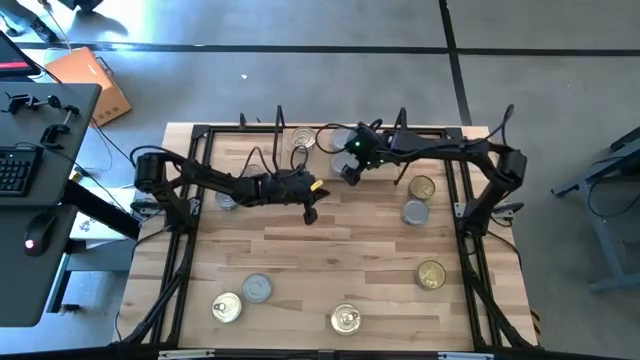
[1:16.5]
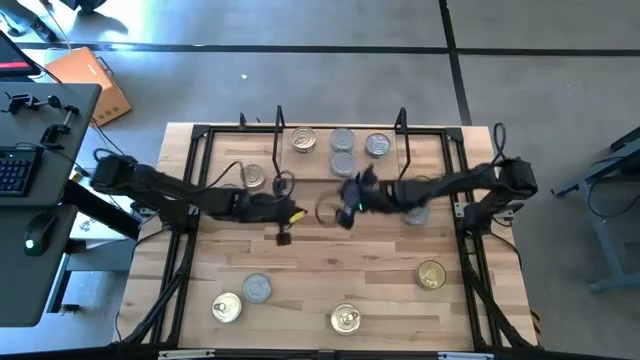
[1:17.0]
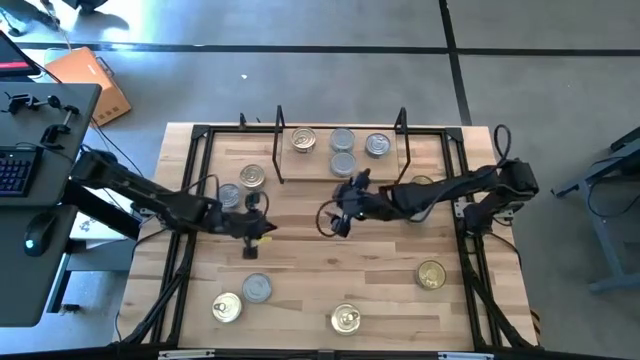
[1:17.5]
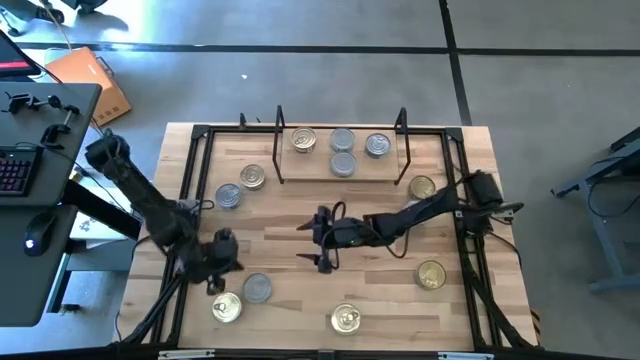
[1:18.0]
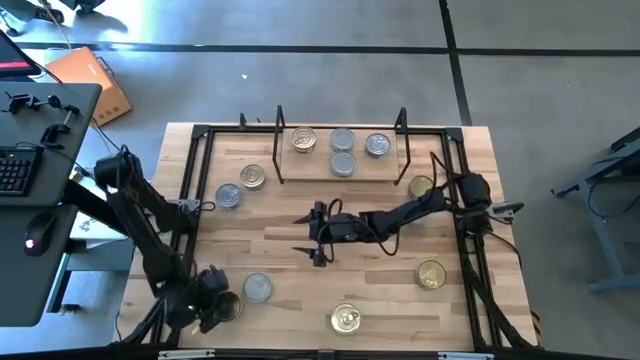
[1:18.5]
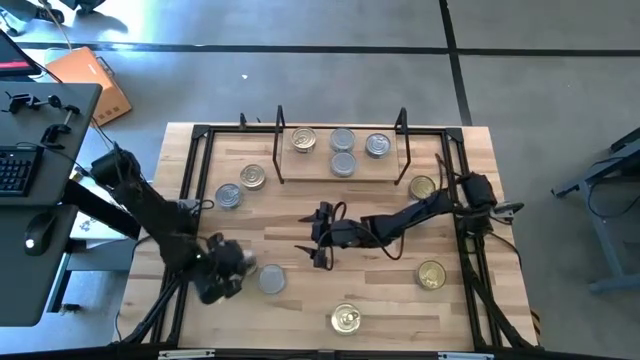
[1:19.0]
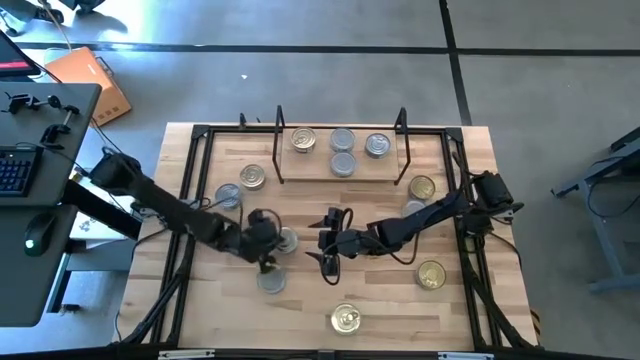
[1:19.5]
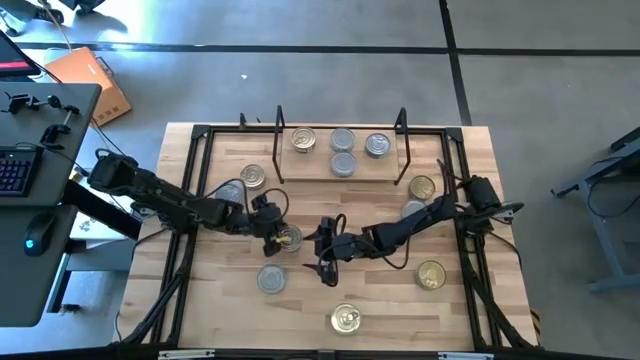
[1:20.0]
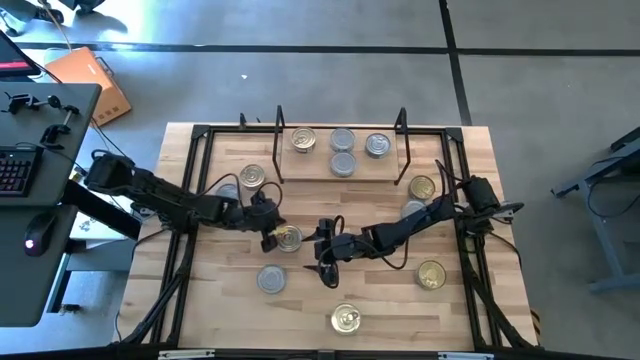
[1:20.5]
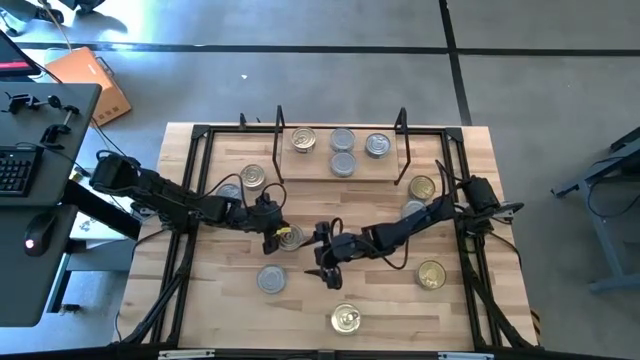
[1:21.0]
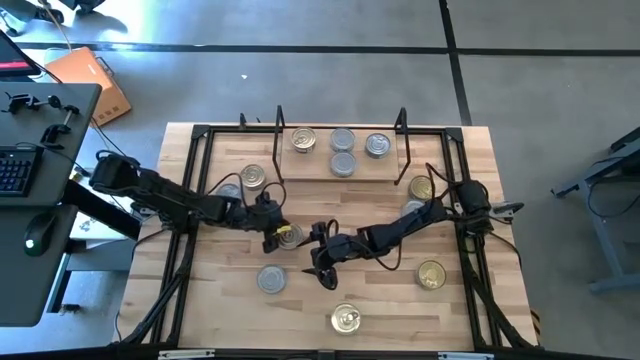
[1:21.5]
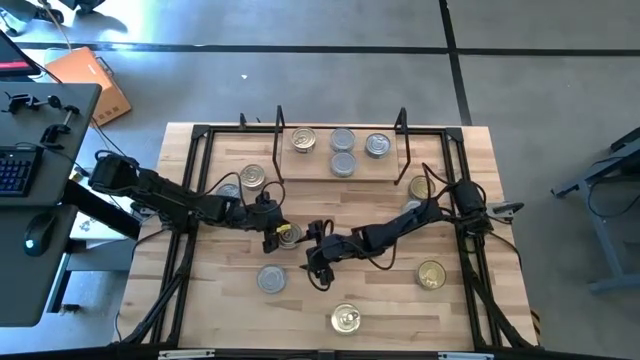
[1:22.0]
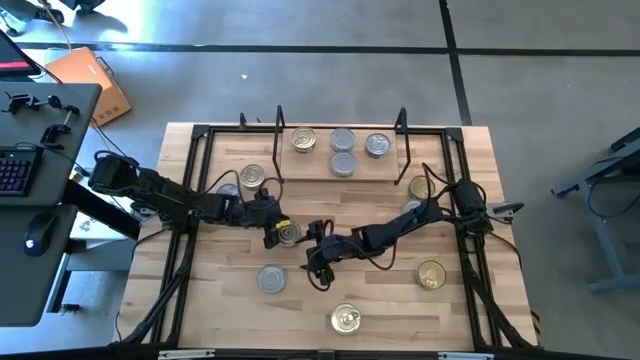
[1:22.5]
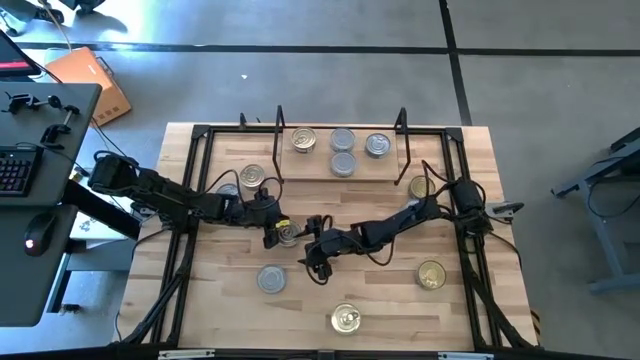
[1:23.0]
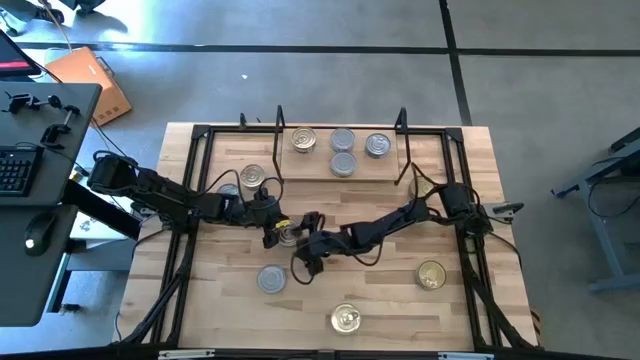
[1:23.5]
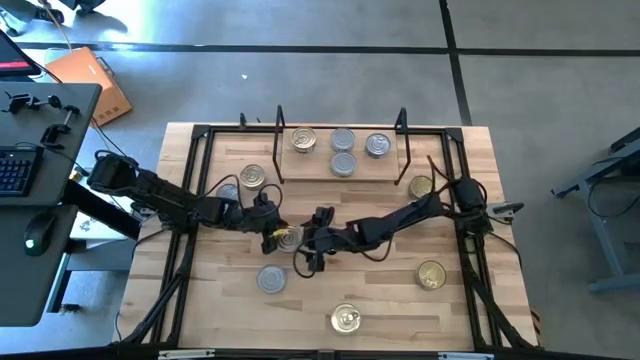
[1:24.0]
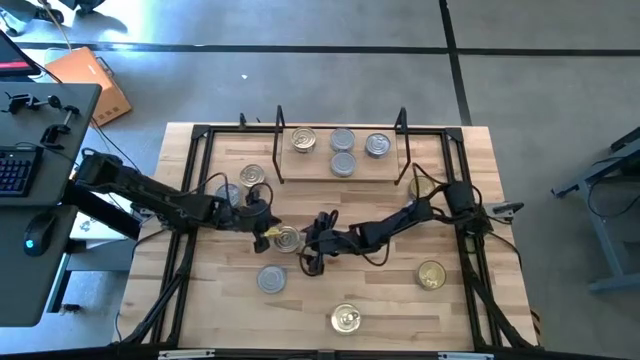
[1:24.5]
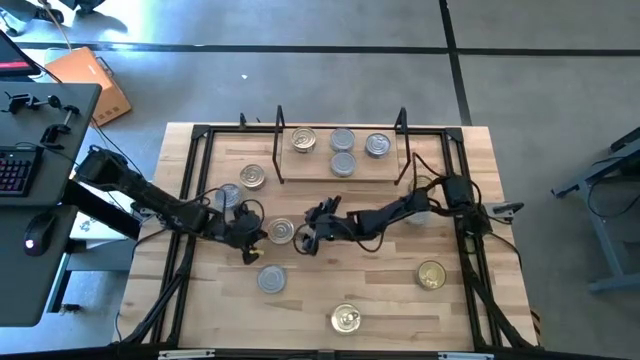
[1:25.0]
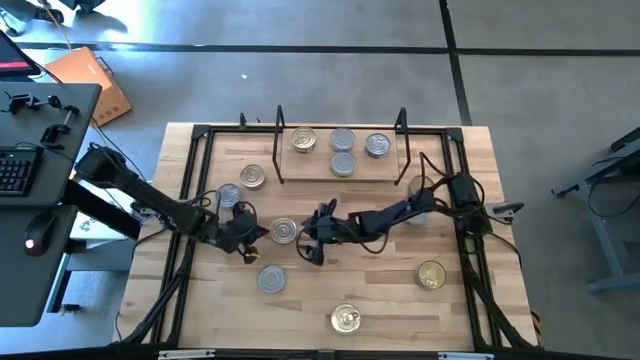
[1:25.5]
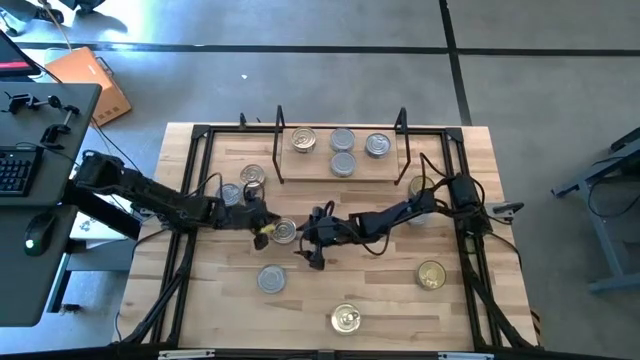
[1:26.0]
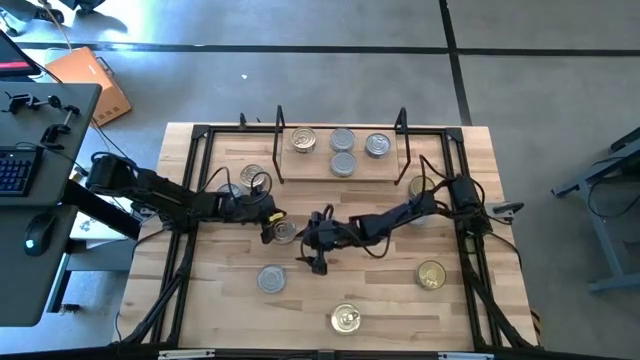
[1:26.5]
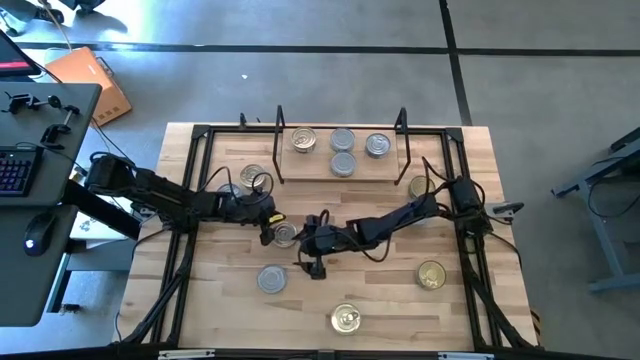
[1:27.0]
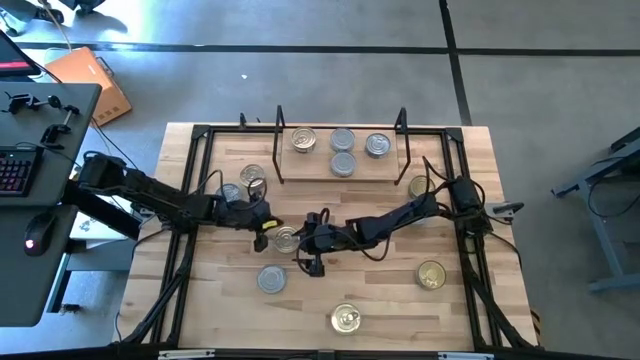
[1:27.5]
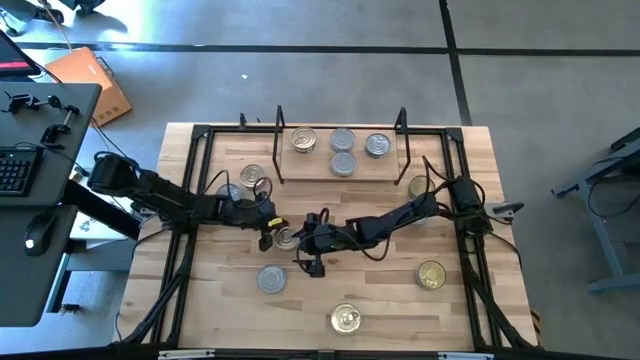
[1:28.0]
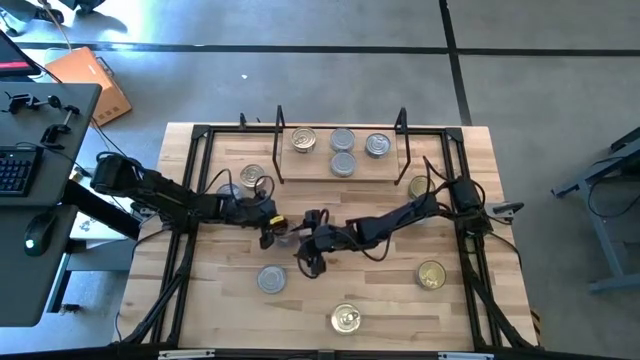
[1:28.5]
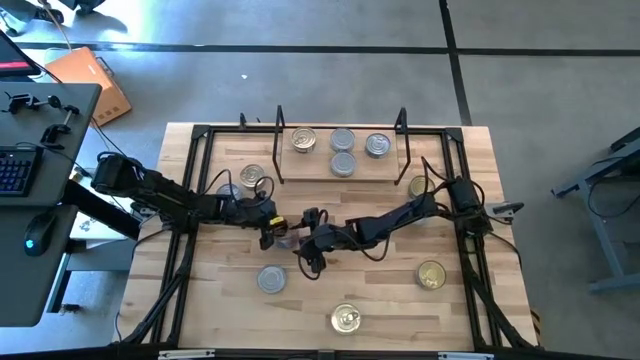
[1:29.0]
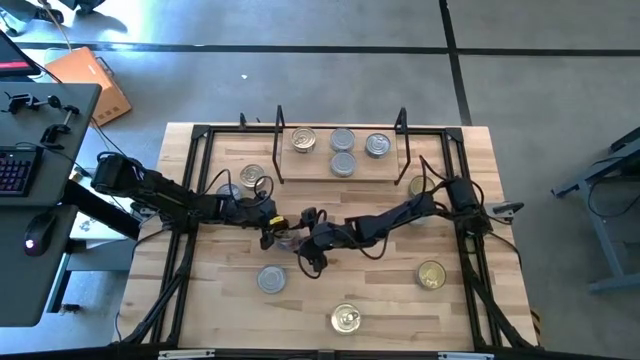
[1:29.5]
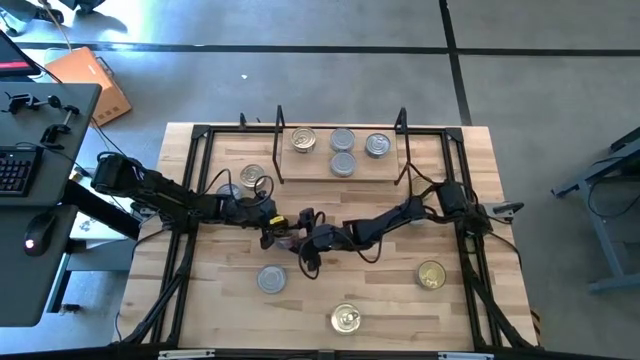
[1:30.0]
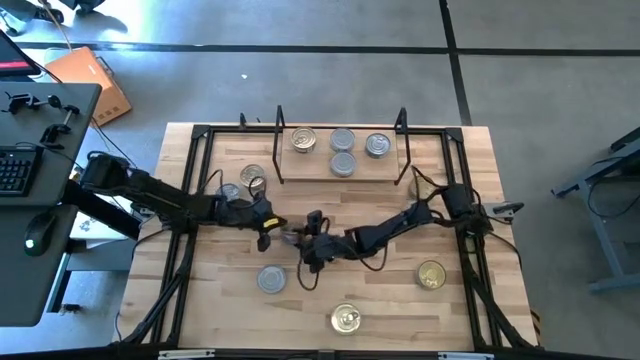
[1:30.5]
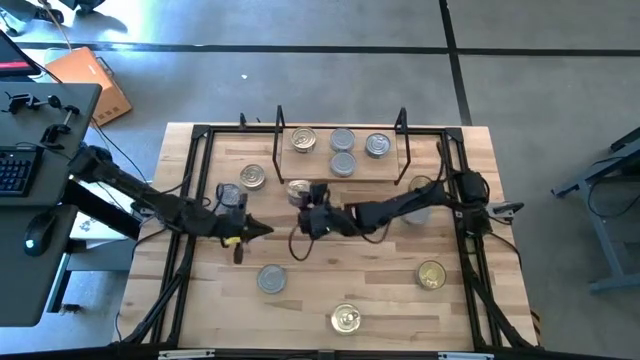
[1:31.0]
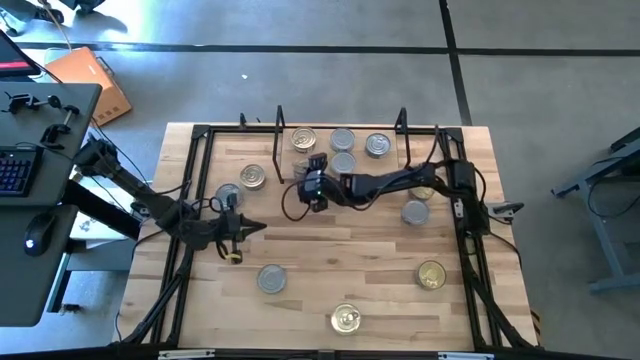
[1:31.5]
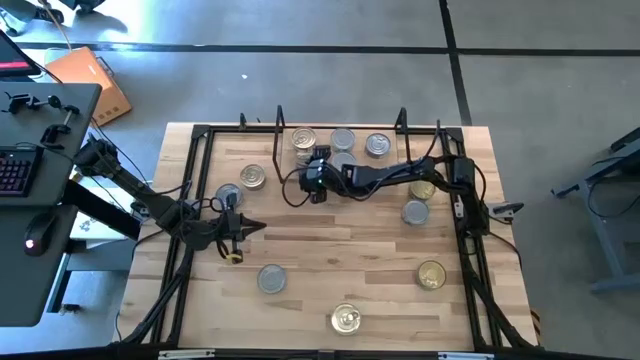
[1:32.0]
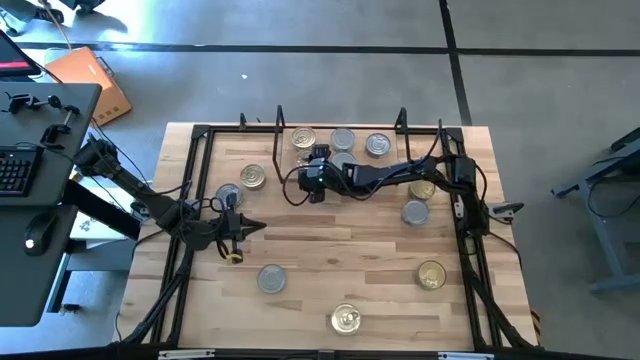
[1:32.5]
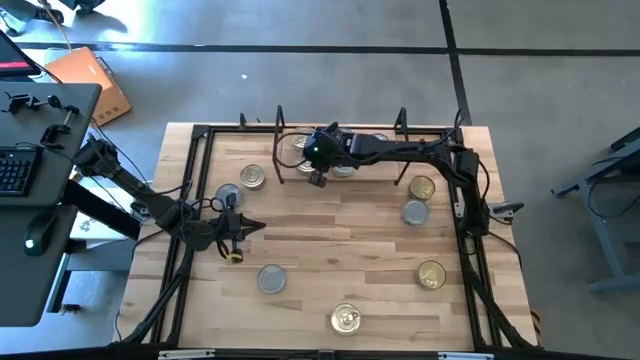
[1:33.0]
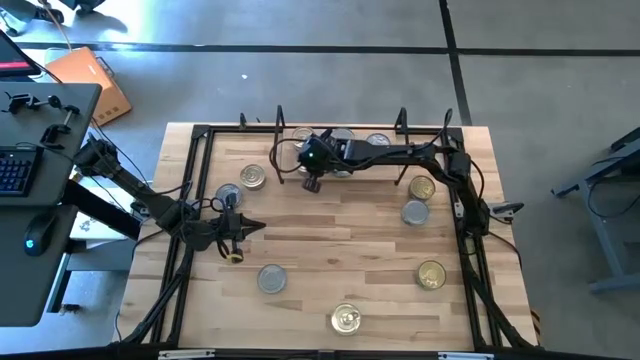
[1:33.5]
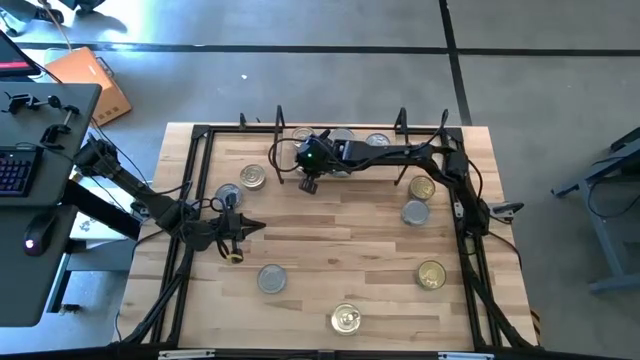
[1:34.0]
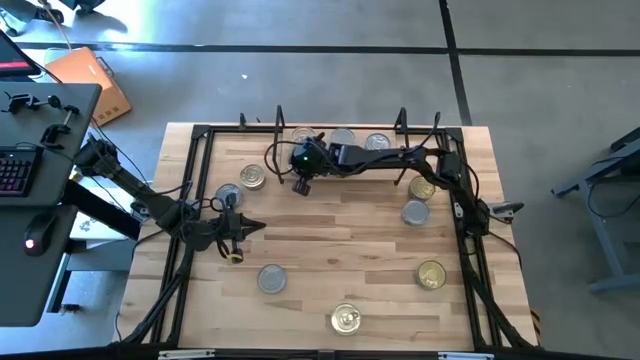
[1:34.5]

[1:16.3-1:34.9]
Task: Stack canned seafood by type on shelf
Put the blue-pink tuna can on the shelf aligned with the other blue-pink tuna can

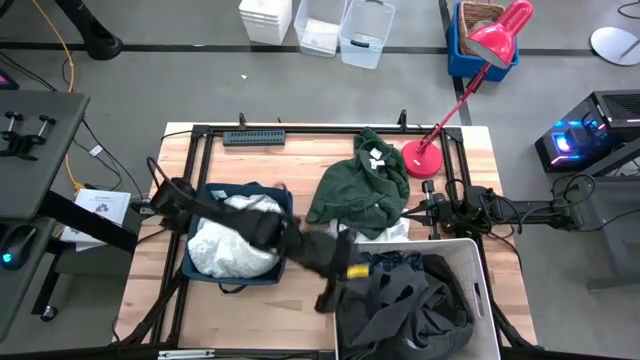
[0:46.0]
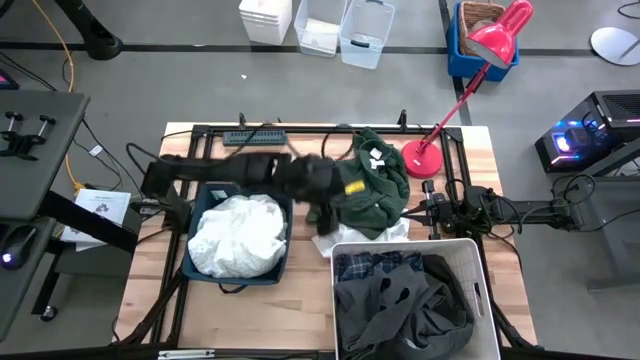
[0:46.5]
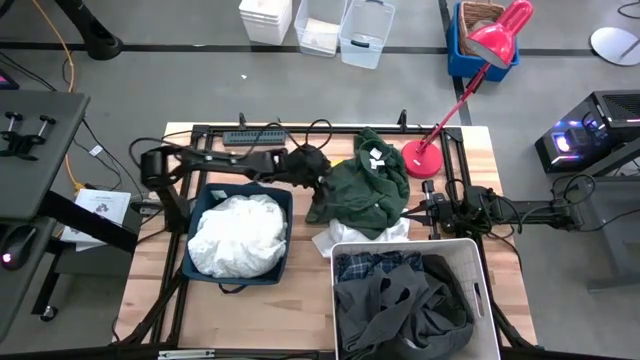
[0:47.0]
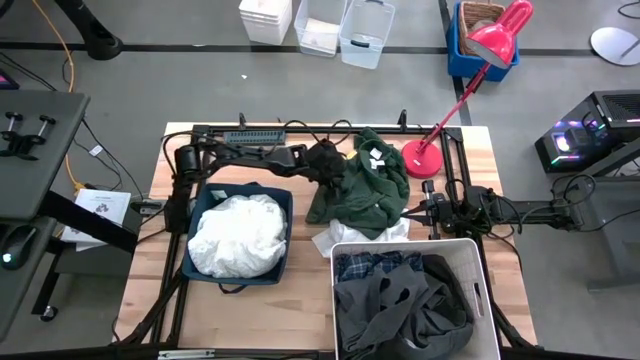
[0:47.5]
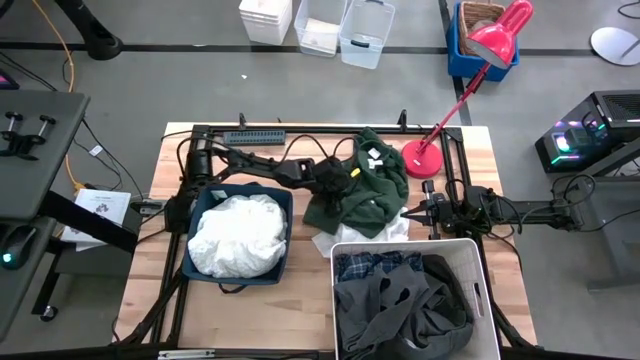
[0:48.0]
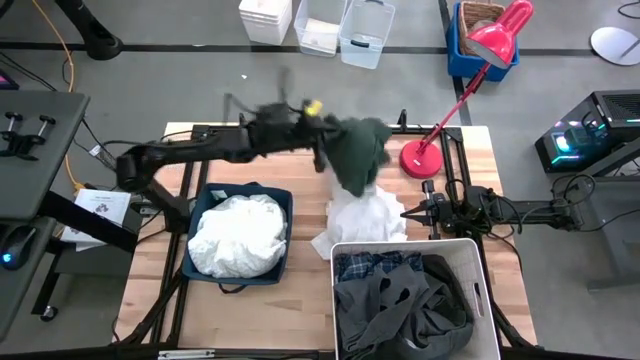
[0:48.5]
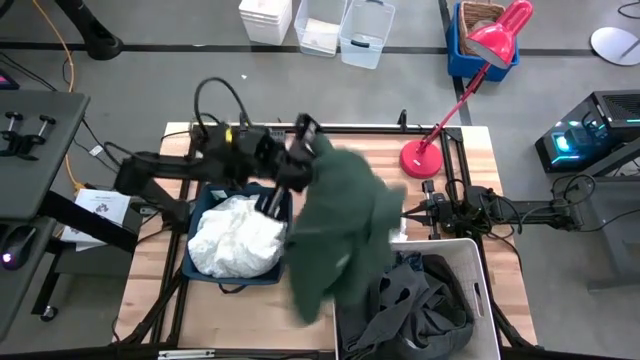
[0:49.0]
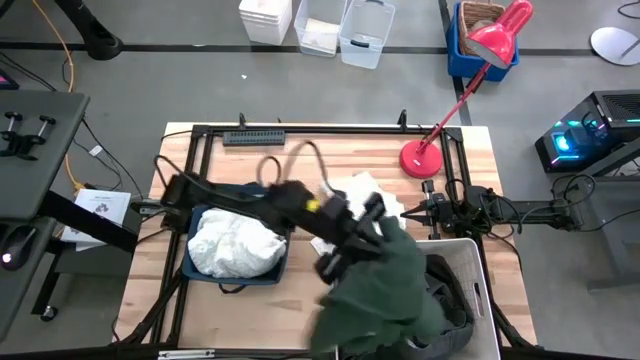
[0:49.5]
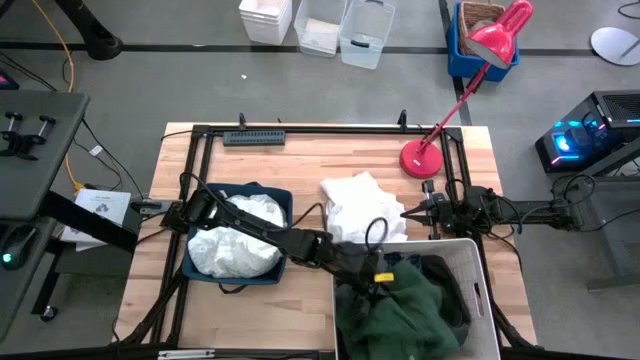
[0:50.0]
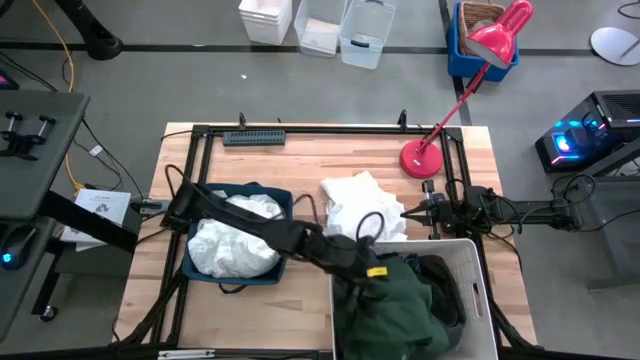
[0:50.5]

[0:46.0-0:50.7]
Task: Sort clothes
Put the green shirt into the white laundry bin
